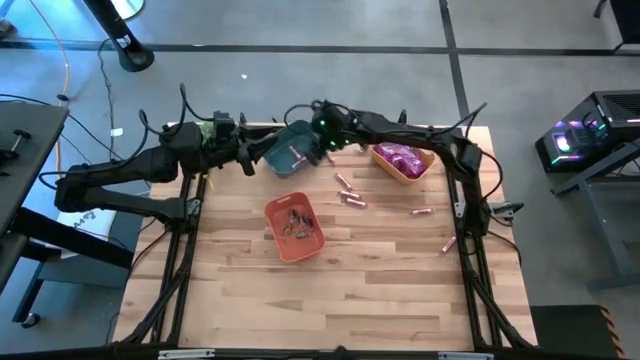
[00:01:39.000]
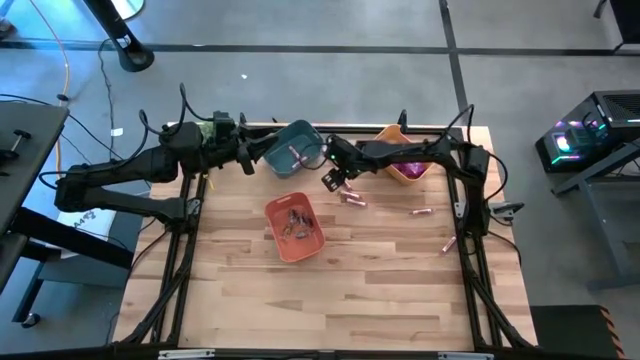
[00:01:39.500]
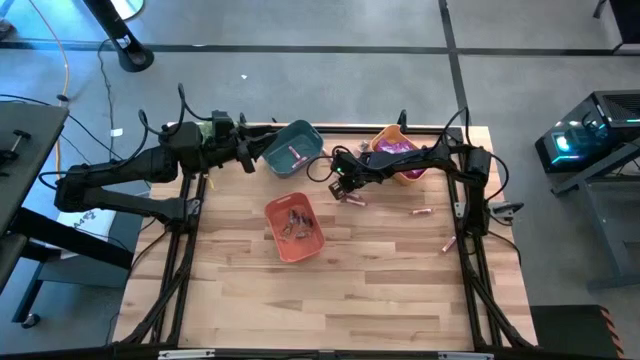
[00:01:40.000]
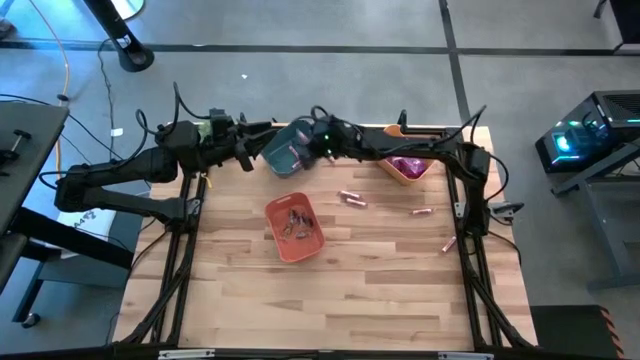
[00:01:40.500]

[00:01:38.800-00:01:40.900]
Task: Sort candy
Put the red candy into the blue bin

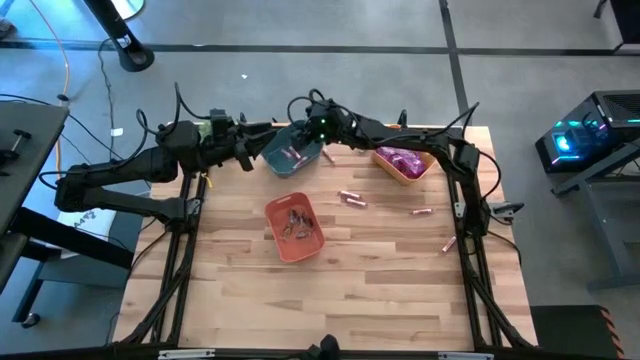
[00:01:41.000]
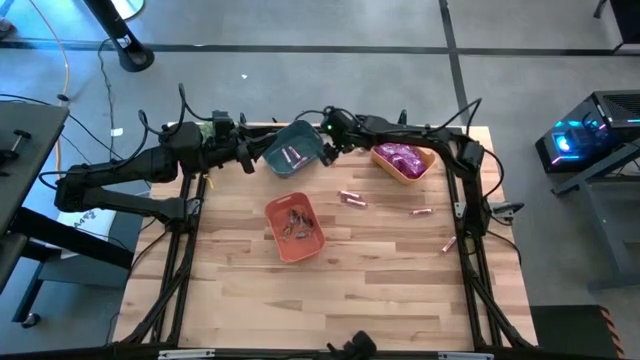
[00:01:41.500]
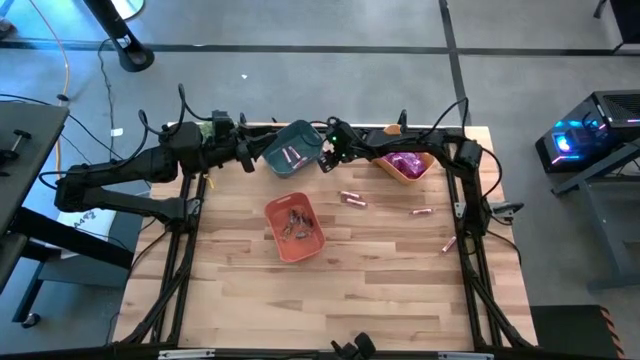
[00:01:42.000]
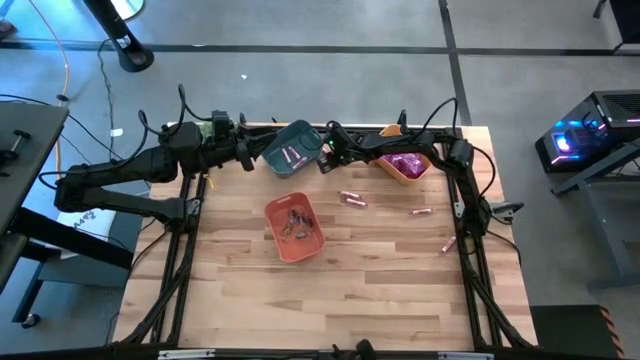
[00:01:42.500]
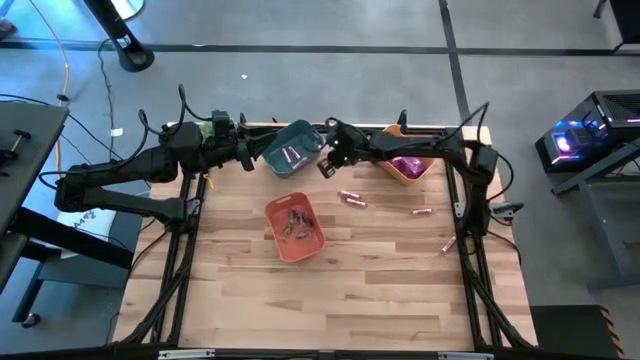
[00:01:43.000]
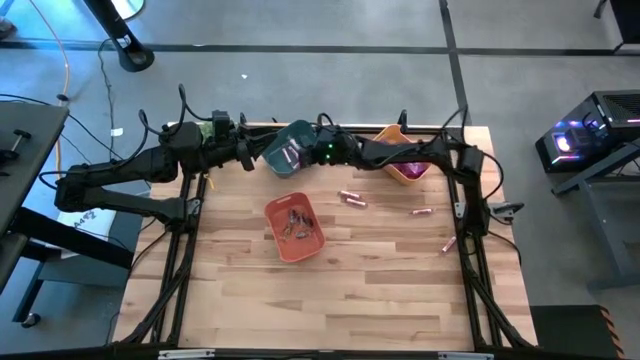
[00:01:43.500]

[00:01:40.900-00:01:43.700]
Put the red candy into the blue bin

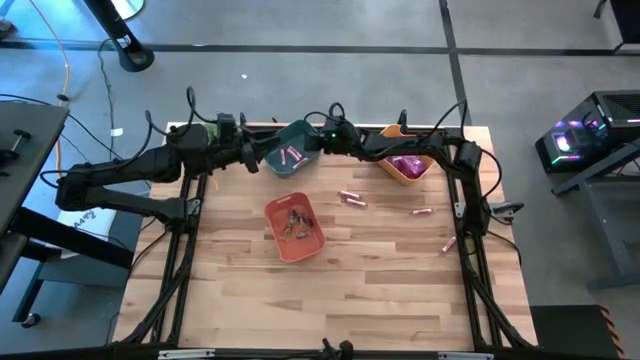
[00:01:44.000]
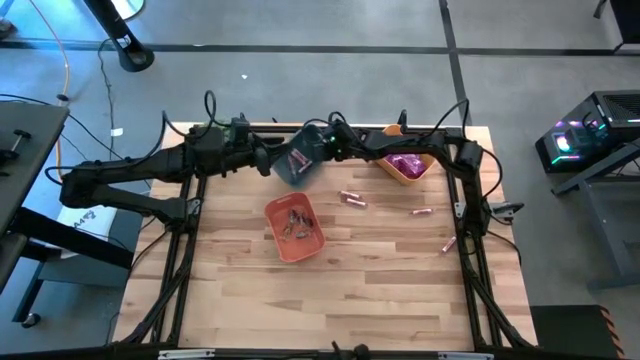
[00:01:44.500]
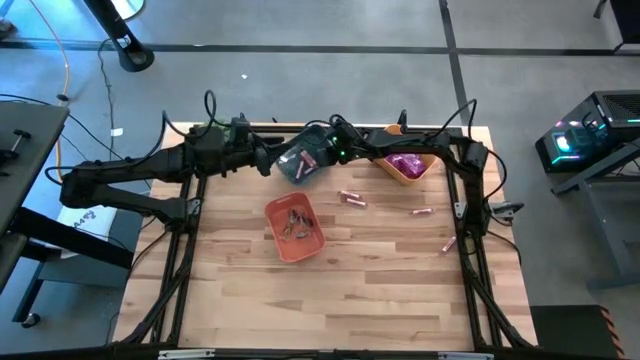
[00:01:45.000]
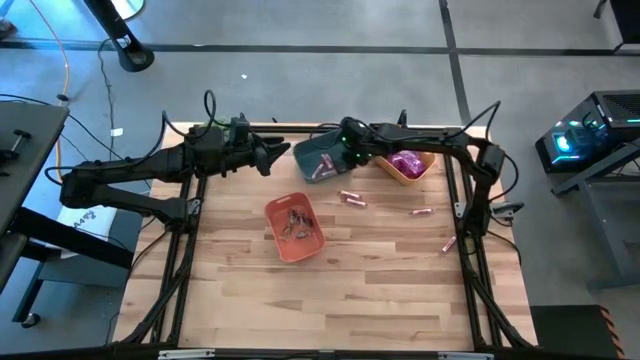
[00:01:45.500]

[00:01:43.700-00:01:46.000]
Adjust the blue bin on the table

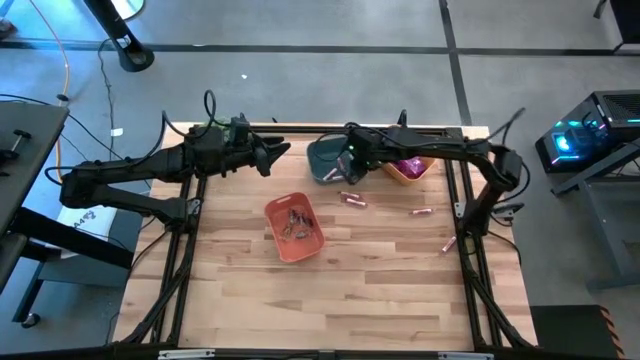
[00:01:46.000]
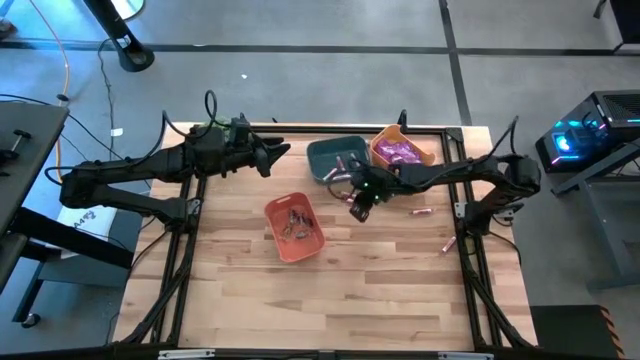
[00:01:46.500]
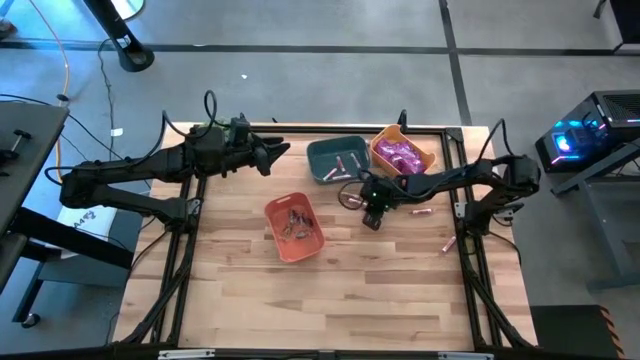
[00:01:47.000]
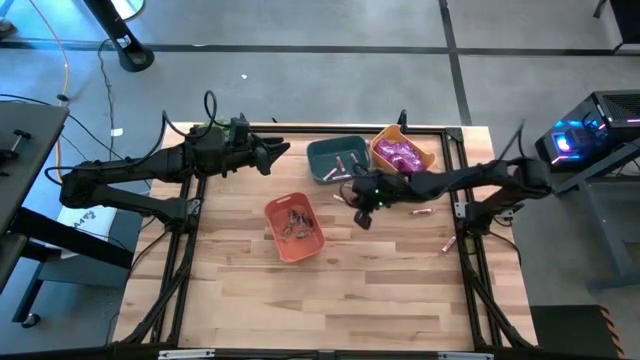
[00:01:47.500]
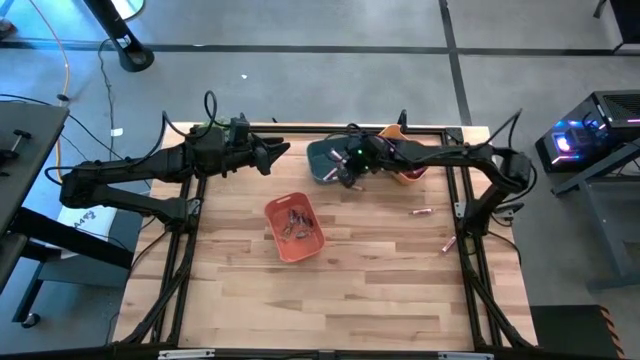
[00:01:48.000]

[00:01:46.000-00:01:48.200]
Put the red candy into the blue bin

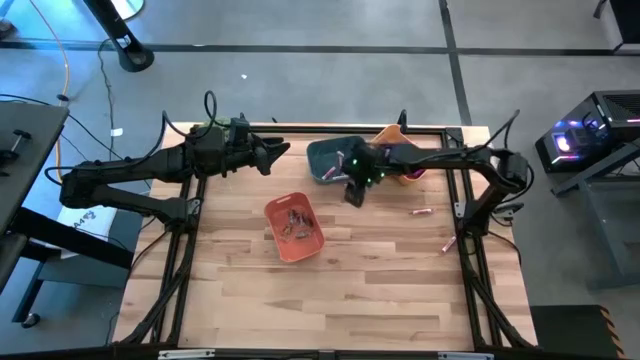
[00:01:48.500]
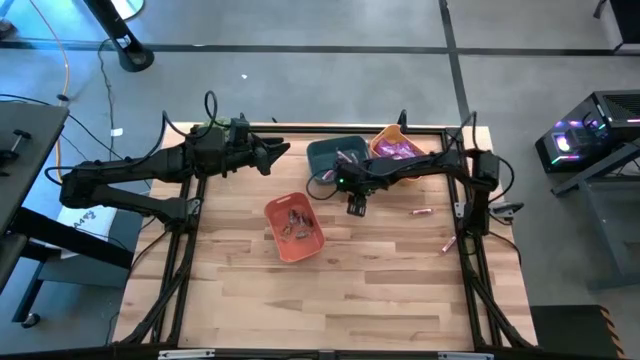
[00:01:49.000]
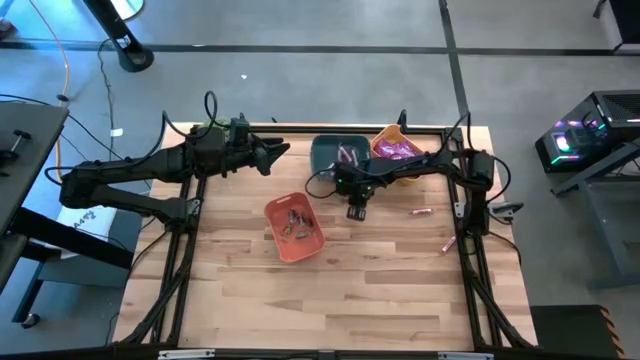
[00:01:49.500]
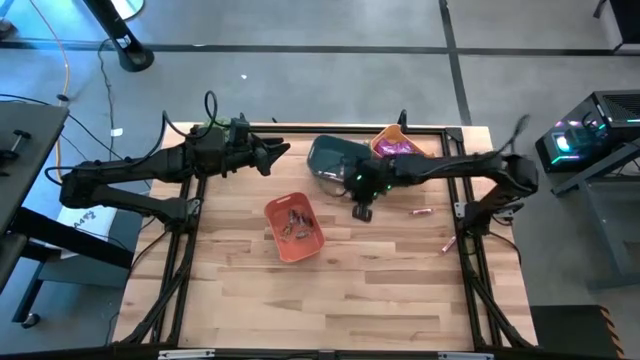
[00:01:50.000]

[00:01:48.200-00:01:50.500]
Put the top red candy into the blue bin

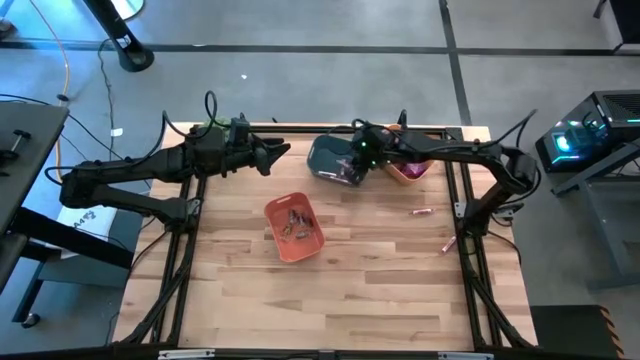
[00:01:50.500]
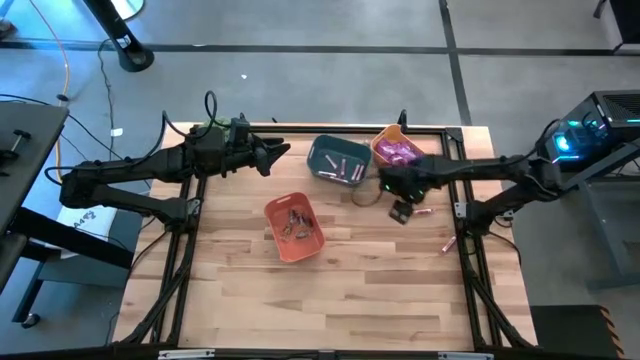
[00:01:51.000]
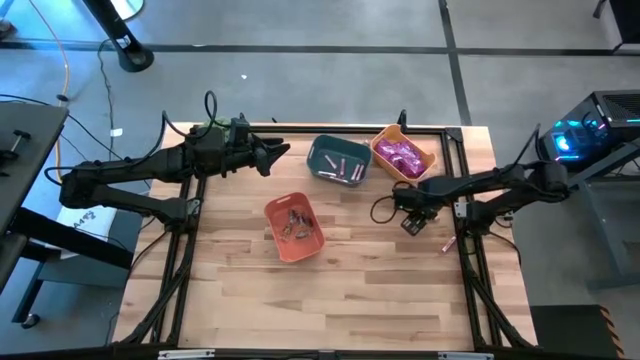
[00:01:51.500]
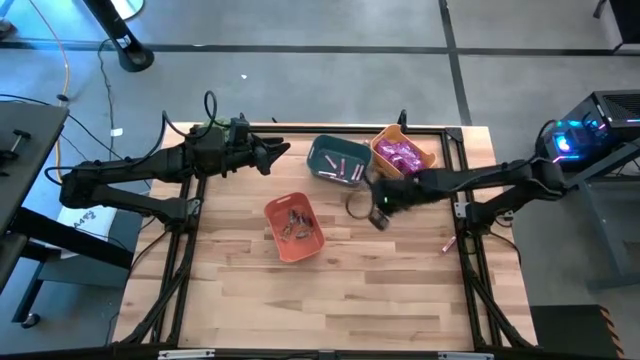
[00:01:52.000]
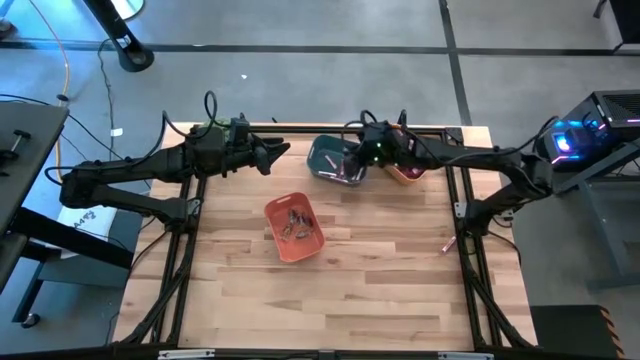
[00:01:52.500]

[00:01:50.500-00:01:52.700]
Put the top red candy into the blue bin

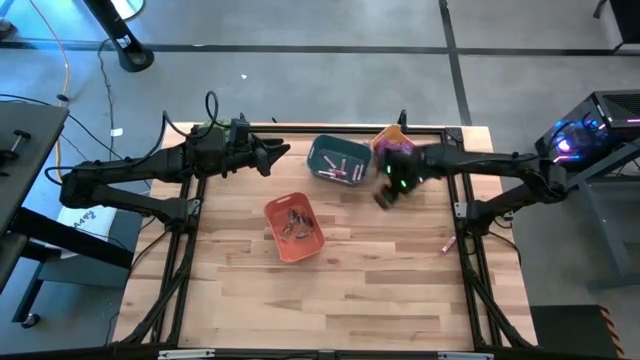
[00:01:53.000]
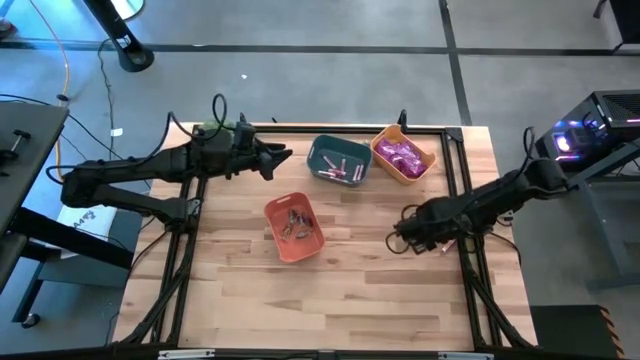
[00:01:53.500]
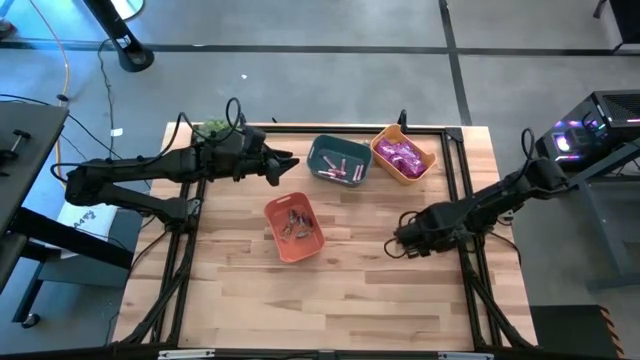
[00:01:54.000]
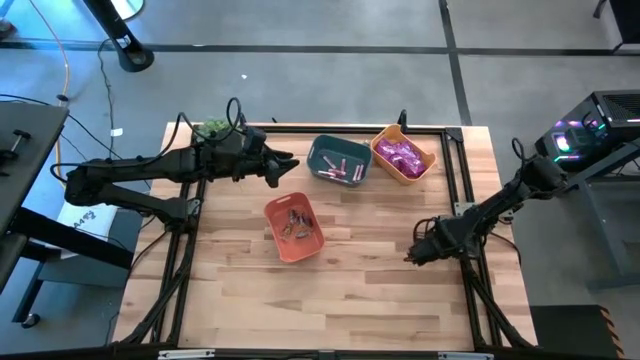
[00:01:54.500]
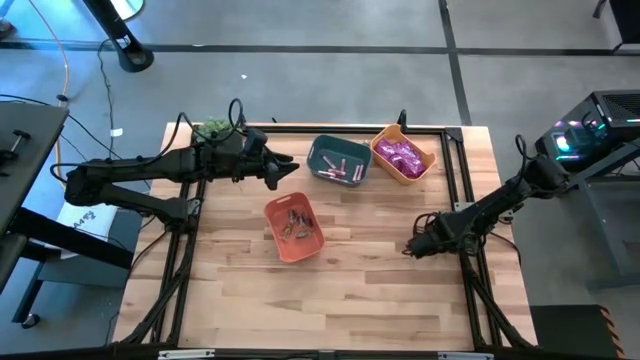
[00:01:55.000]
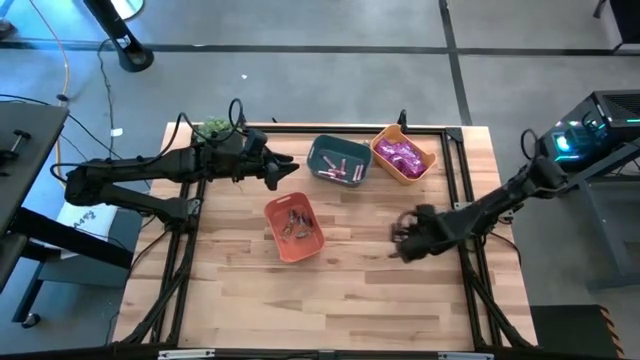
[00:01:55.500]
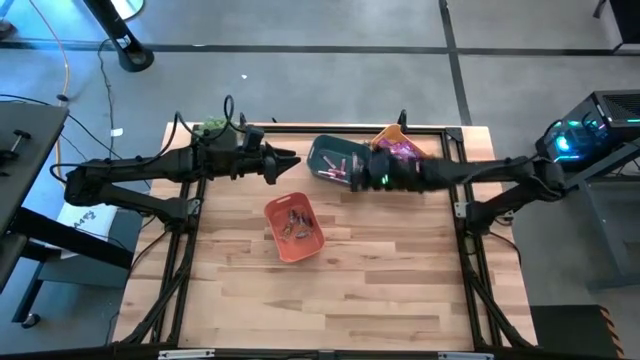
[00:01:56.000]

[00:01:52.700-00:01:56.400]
Put the red candy into the blue bin

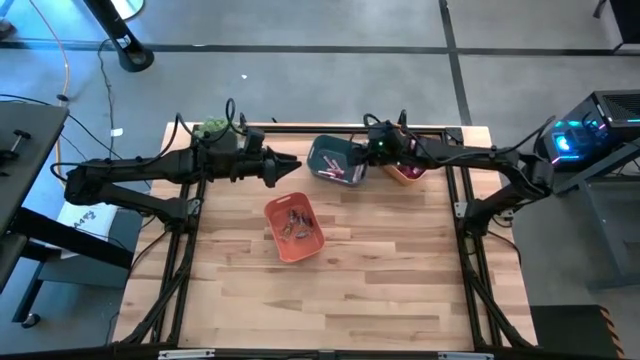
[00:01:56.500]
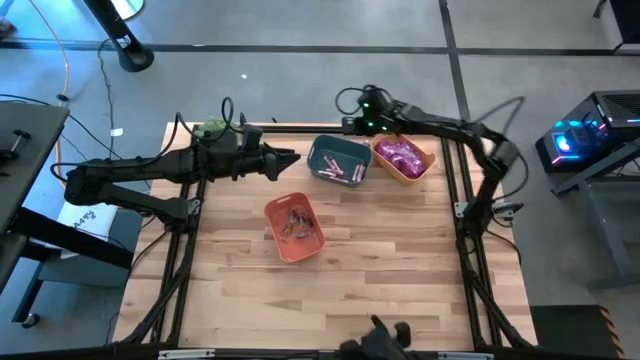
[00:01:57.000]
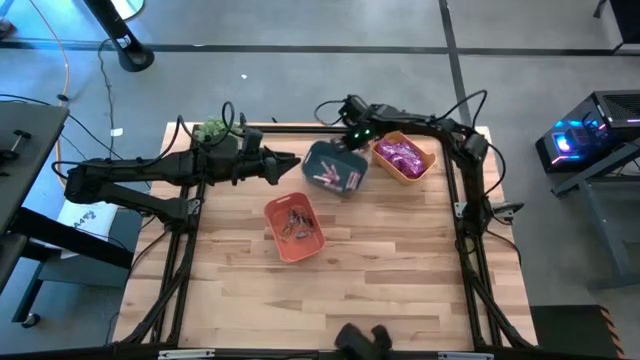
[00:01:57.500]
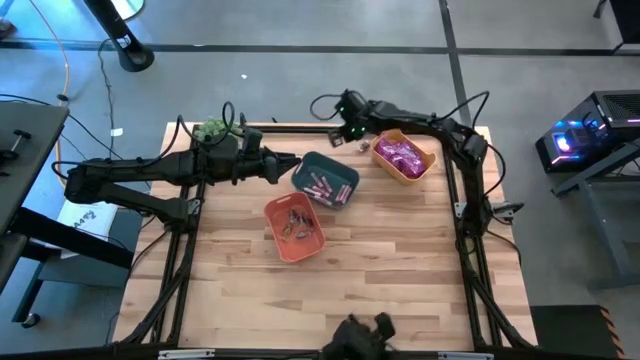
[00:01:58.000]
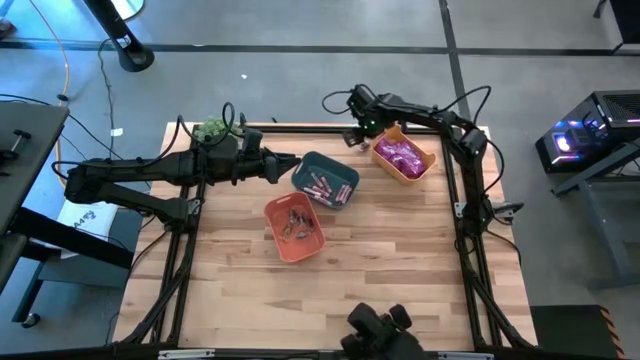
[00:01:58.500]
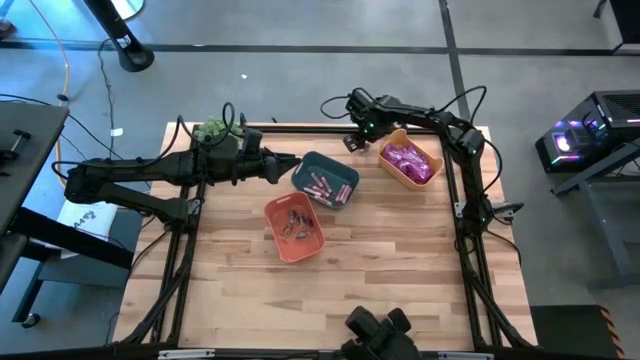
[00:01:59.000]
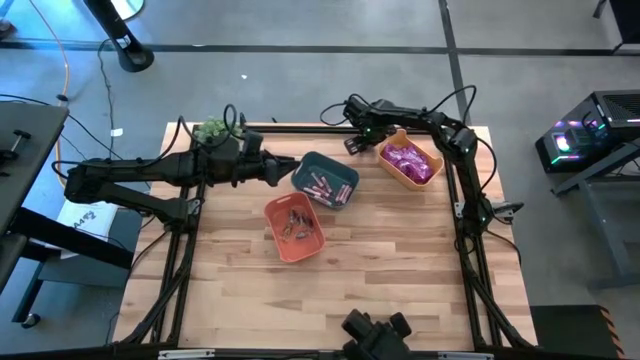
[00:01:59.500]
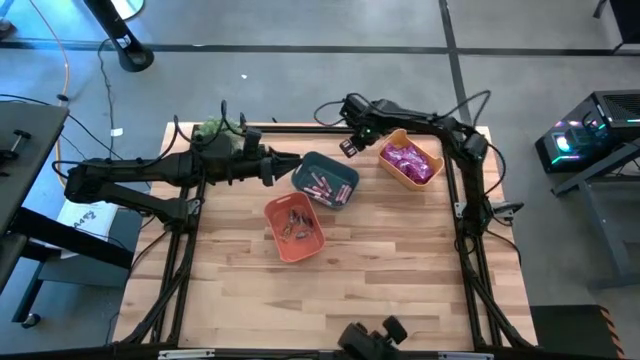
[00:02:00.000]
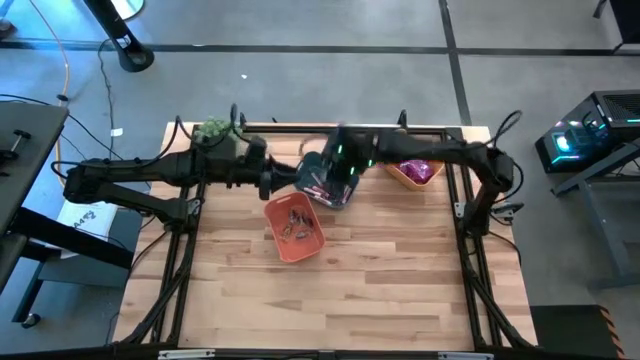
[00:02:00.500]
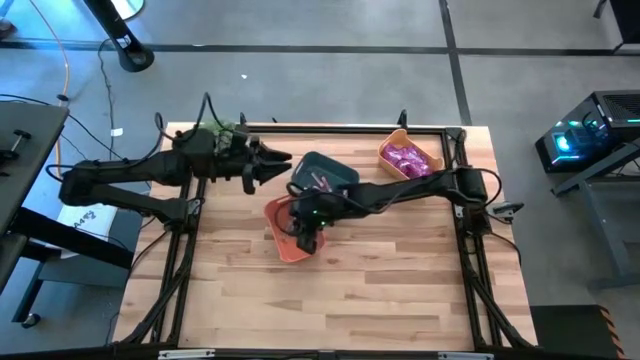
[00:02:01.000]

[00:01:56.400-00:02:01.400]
Put the brown candy into the orange bin
